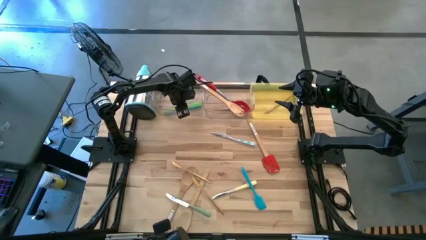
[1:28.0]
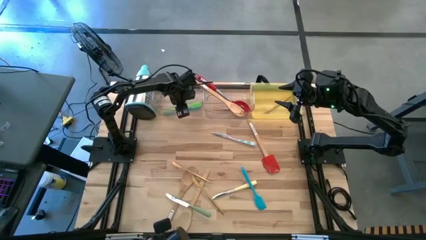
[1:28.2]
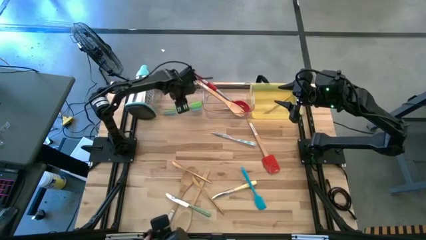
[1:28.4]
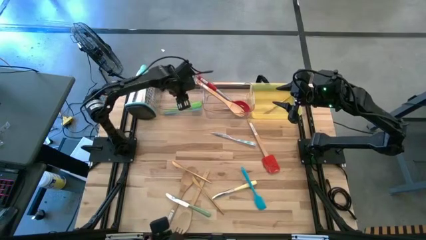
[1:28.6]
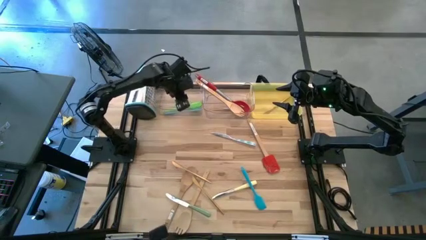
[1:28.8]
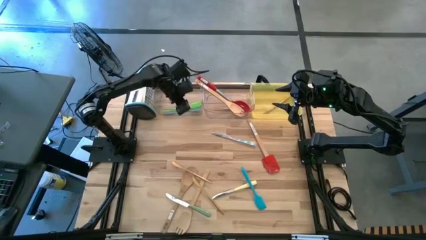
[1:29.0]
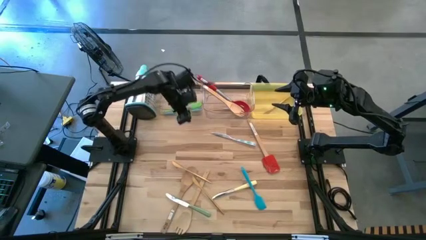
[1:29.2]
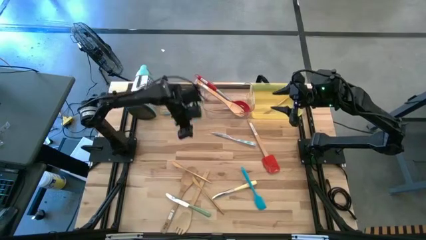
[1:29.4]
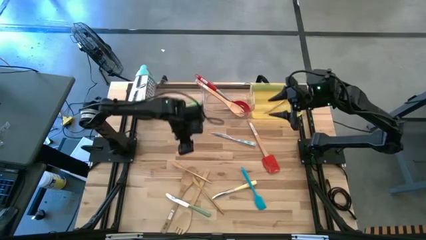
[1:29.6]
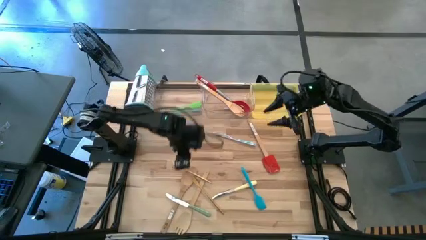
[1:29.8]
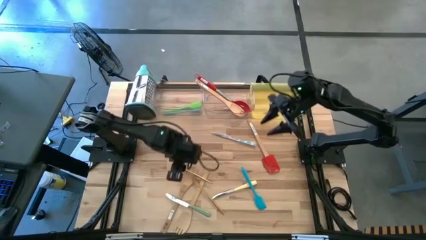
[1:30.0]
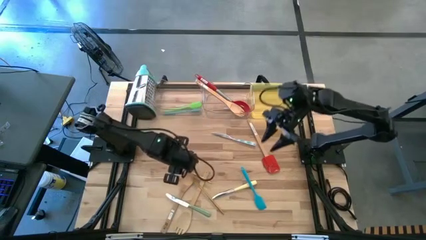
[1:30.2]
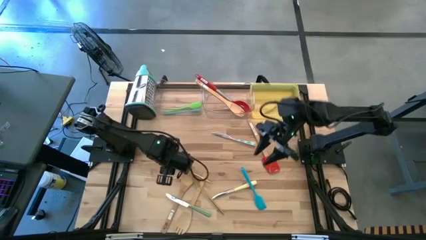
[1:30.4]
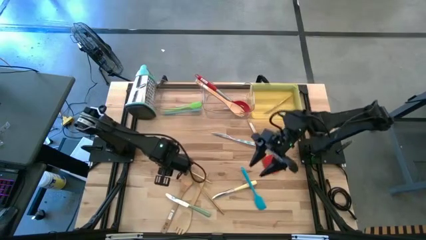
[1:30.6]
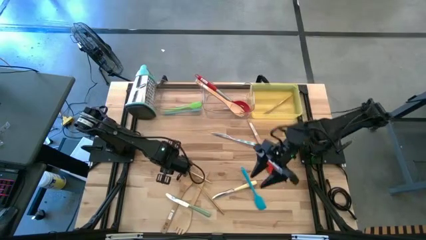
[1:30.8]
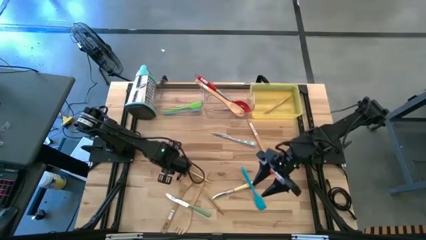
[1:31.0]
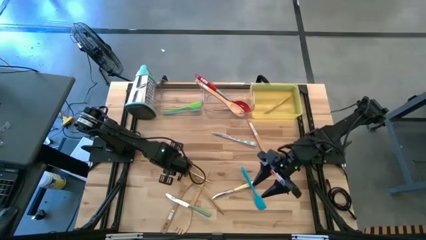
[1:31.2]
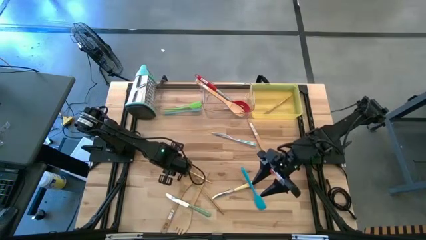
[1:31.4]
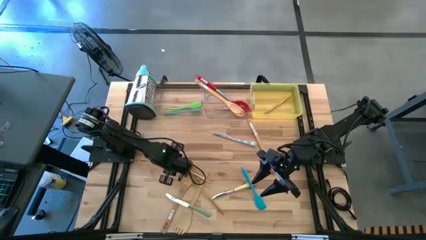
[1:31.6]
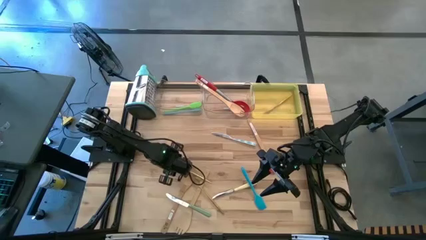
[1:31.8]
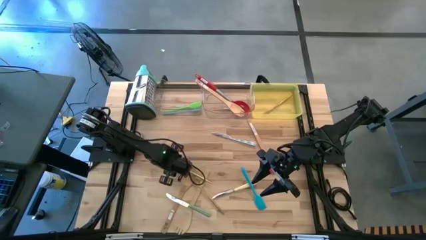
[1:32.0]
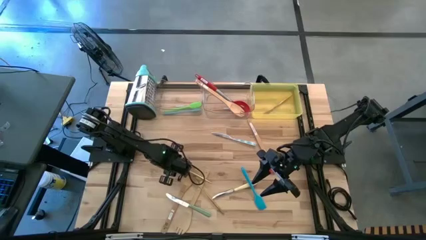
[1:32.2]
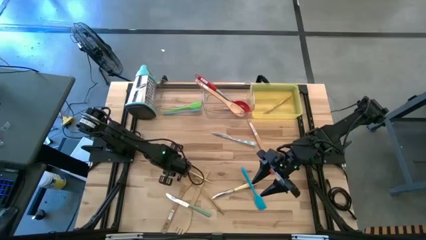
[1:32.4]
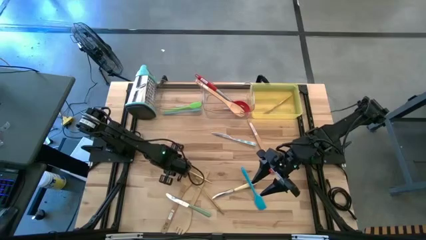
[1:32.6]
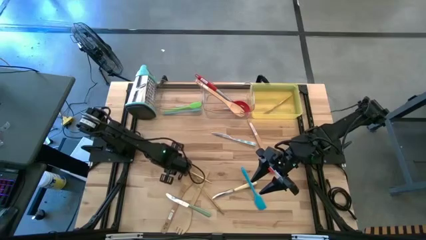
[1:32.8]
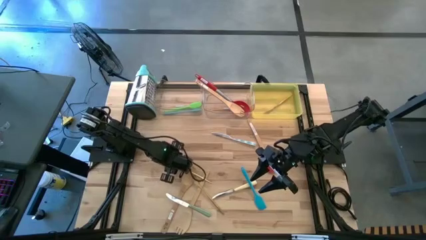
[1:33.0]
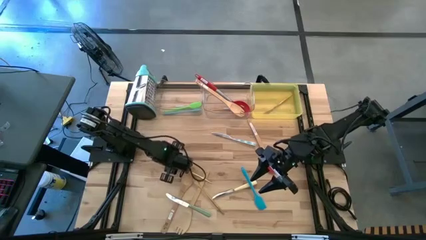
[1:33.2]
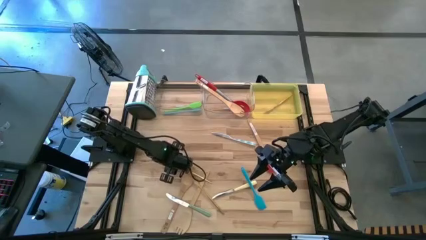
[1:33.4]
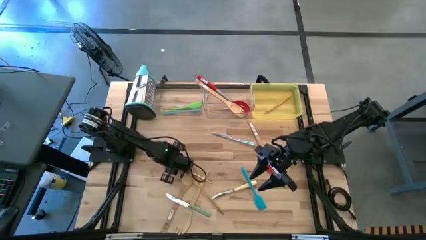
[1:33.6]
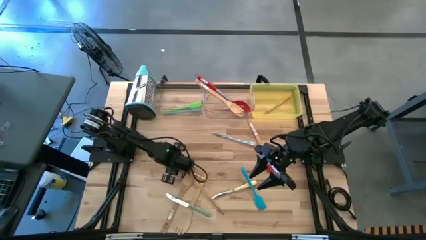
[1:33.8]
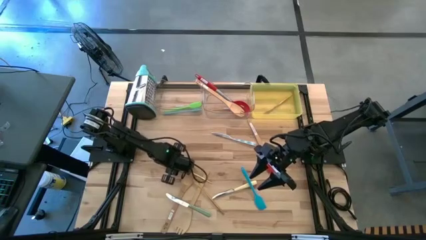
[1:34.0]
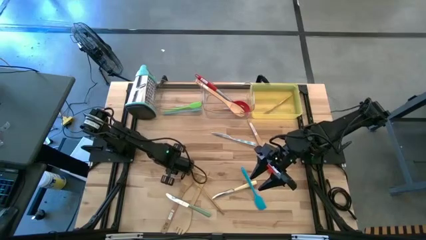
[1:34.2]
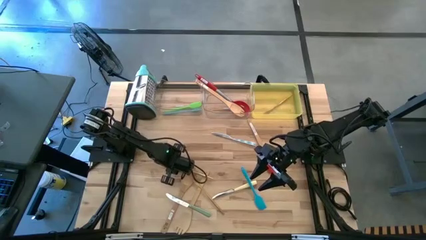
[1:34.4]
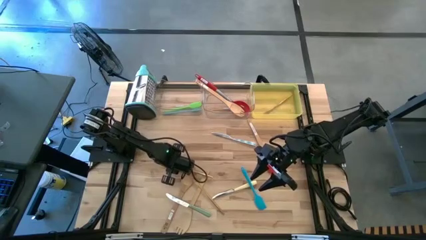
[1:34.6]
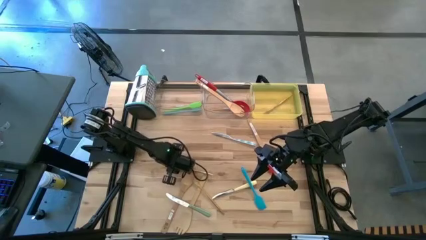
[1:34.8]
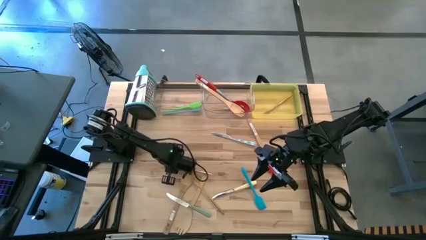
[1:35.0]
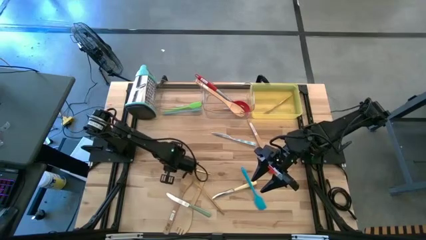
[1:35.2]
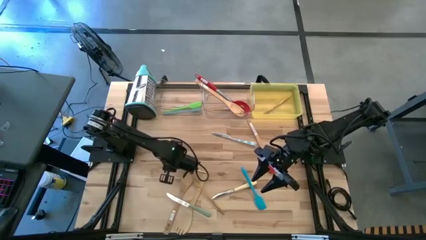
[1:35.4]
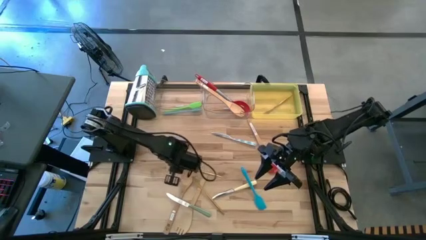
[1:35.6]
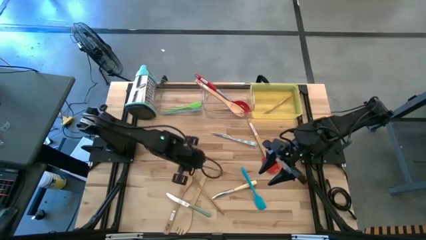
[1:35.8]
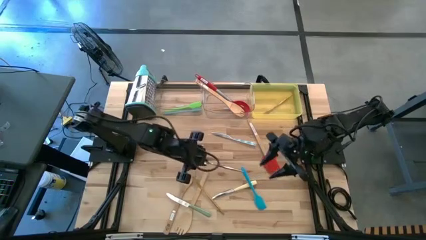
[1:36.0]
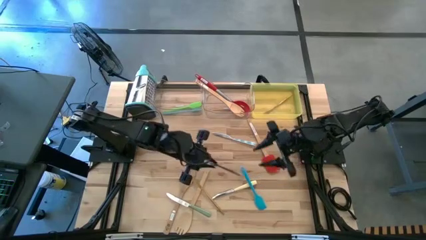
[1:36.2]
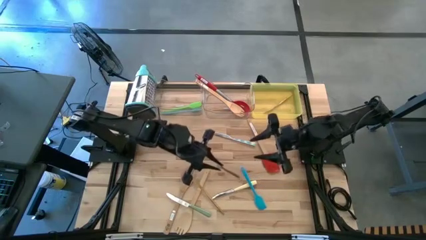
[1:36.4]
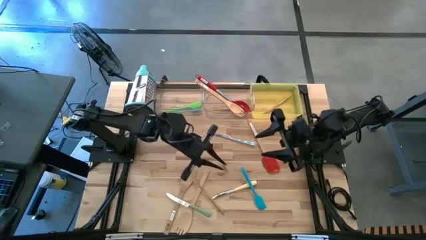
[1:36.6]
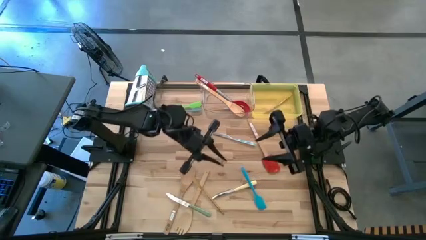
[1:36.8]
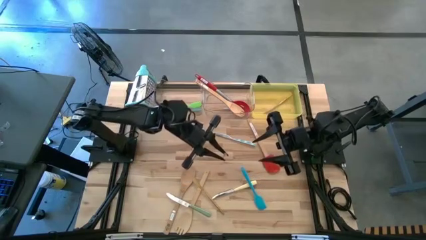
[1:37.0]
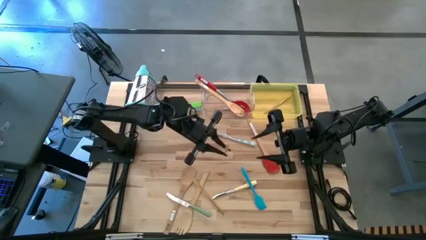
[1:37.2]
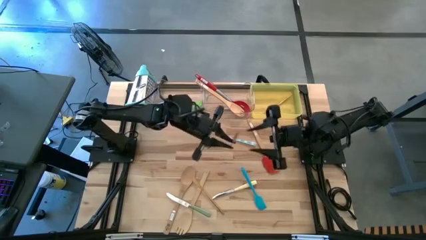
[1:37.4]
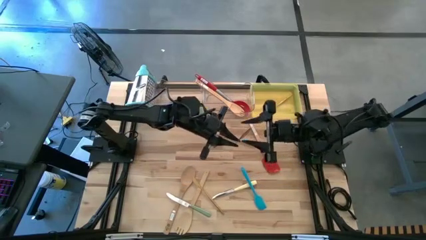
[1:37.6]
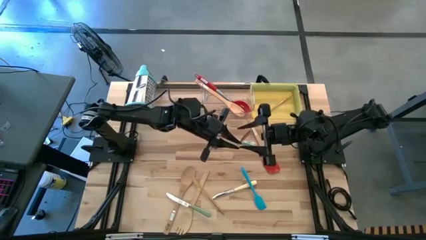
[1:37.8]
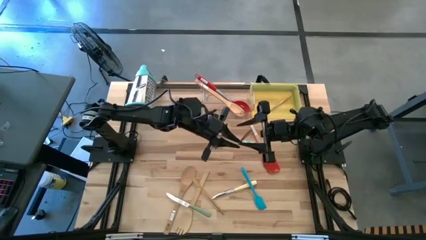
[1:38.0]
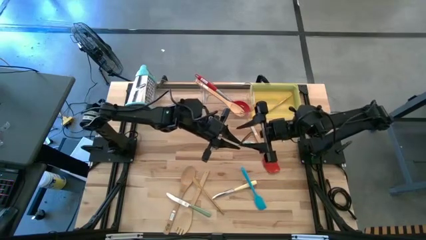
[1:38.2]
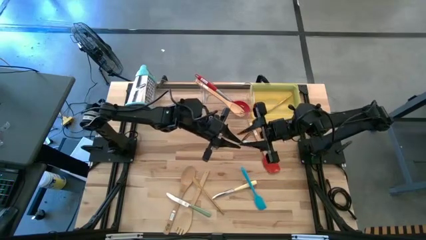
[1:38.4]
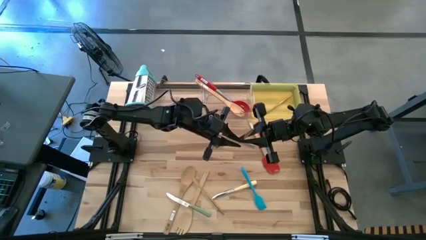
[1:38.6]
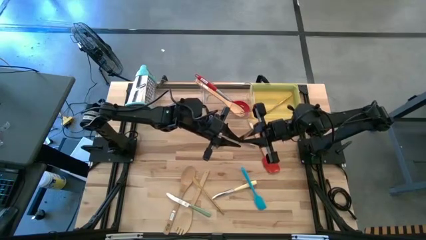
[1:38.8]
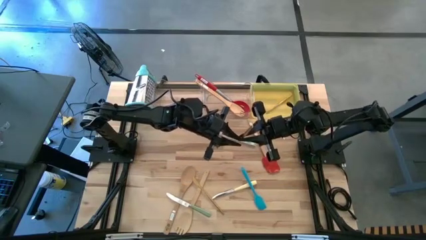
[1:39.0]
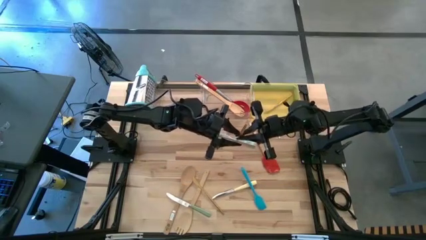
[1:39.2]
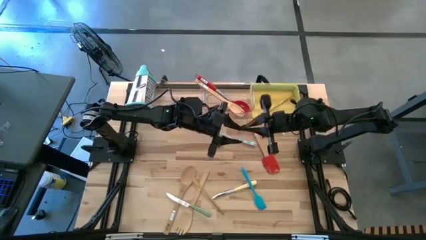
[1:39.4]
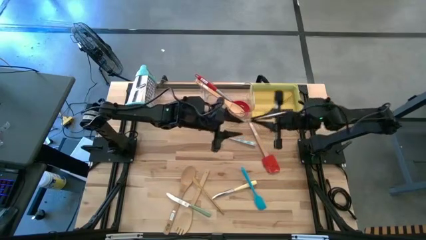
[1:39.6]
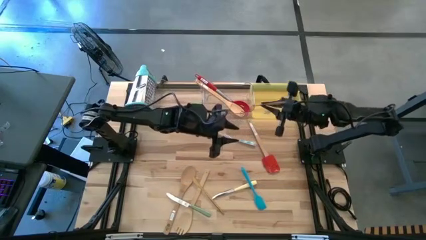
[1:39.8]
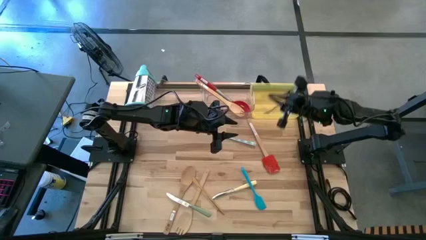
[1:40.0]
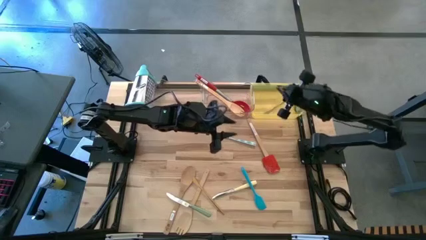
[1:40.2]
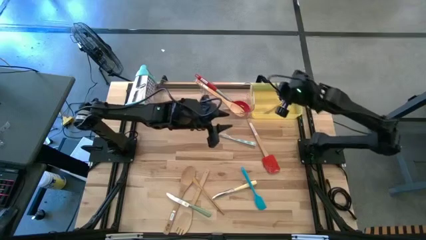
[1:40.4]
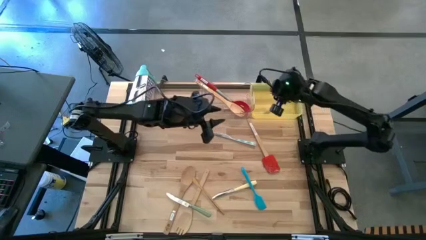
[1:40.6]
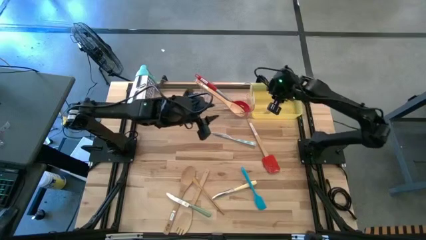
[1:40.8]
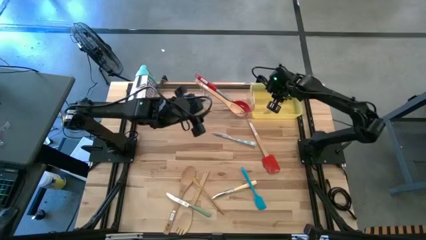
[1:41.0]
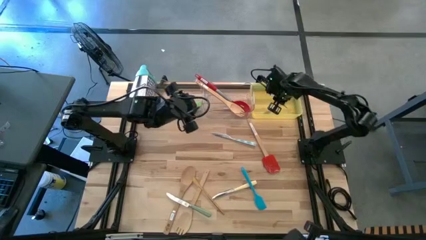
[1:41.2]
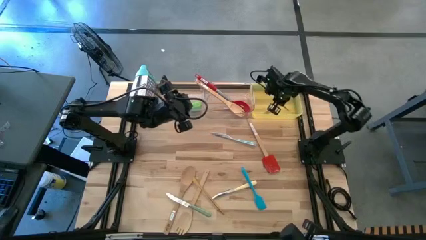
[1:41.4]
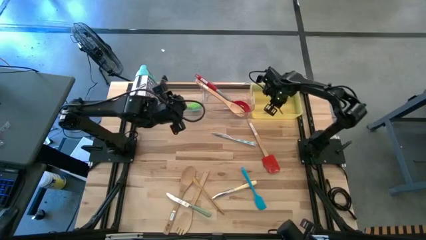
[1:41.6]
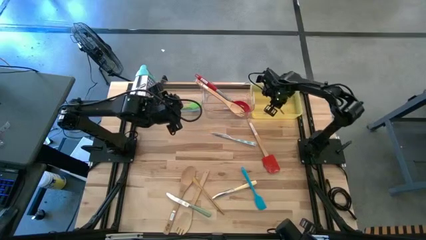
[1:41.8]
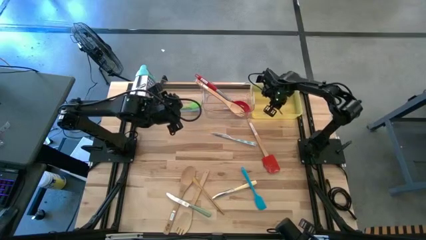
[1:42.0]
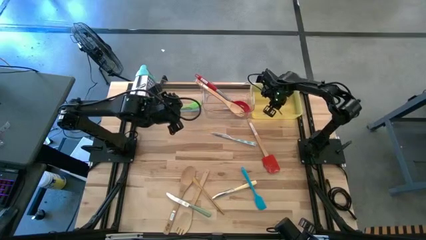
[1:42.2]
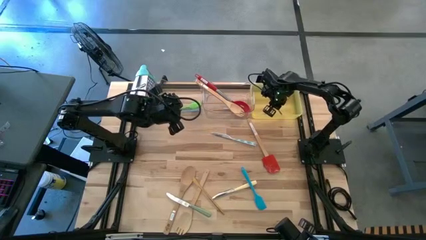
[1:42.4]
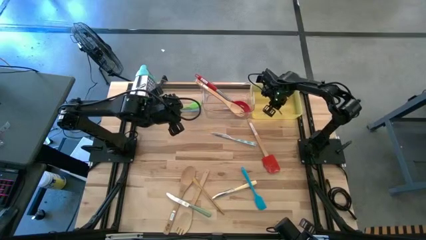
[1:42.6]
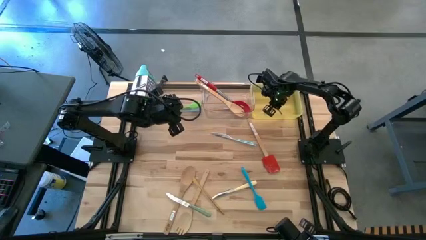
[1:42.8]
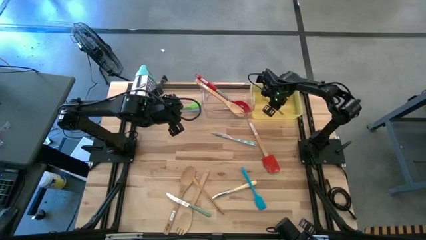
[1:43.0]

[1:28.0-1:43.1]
Task: Pick & Place Kitchen Items
Put the top gold knife into the yellow bin

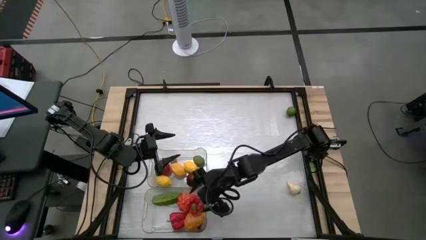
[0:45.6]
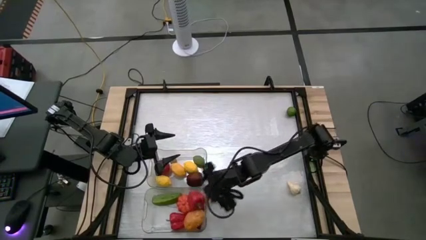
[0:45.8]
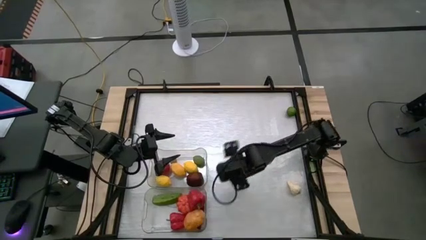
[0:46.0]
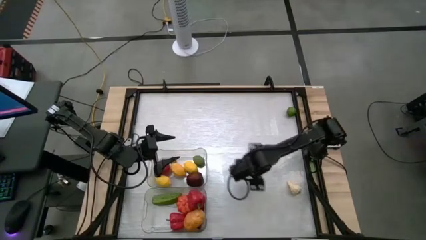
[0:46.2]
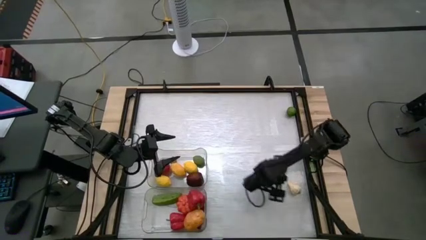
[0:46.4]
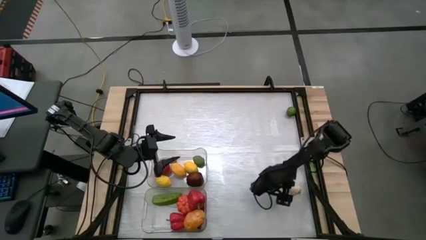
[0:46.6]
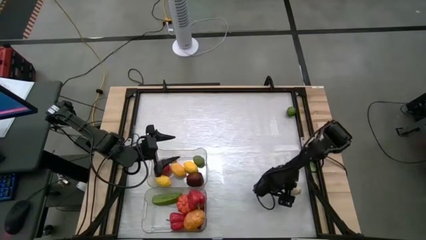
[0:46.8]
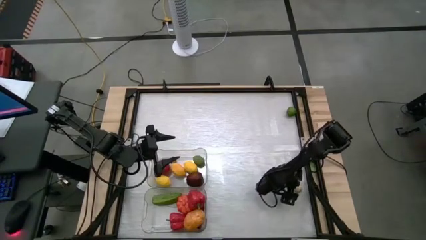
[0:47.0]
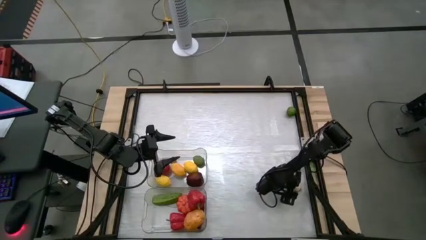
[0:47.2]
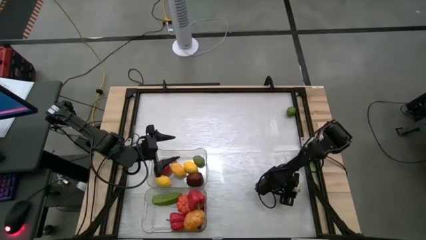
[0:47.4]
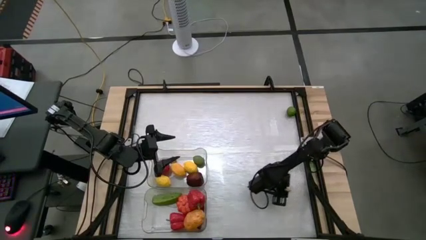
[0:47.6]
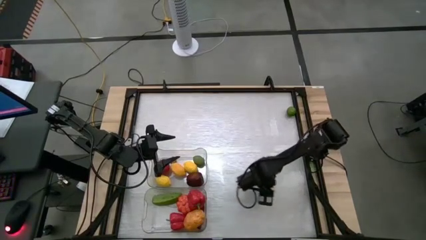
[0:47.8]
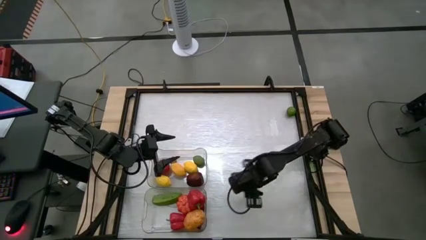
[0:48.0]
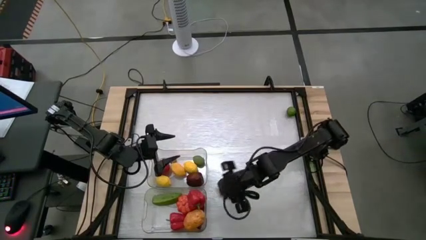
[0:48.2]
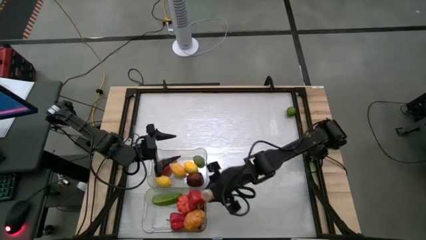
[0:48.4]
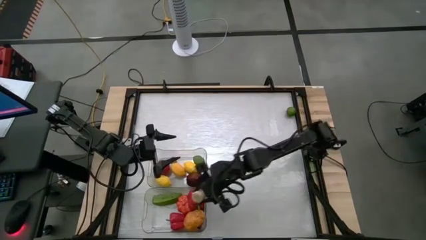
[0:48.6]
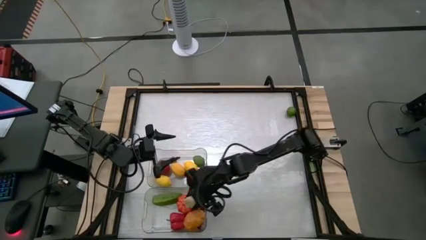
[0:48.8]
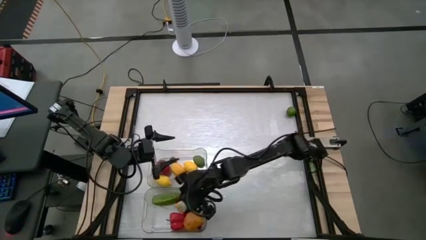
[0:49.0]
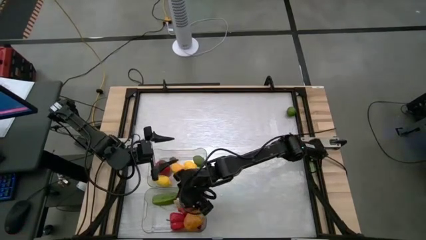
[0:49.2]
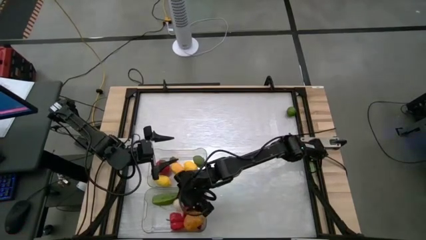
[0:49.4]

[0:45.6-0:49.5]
Task: Sort produce into baskets
Put the shallot into the bottom transparent bin
